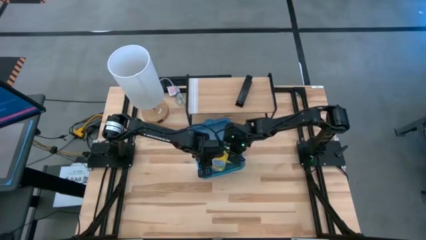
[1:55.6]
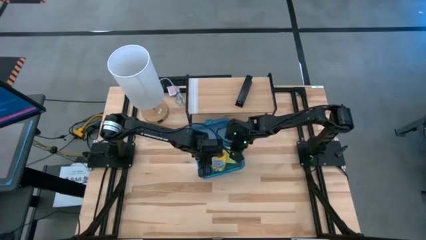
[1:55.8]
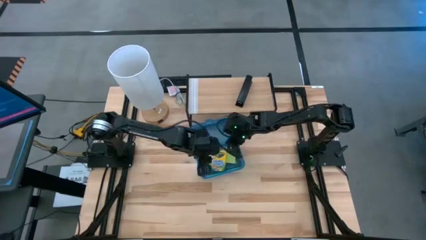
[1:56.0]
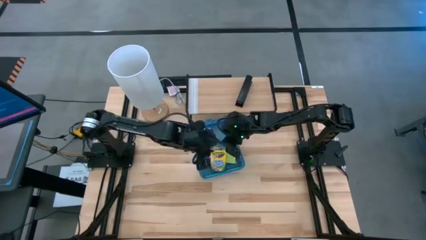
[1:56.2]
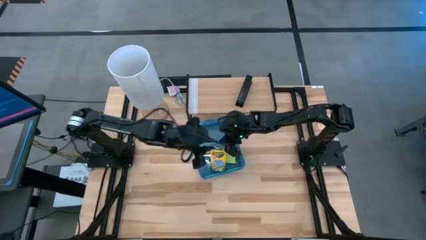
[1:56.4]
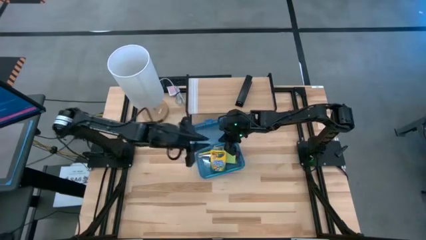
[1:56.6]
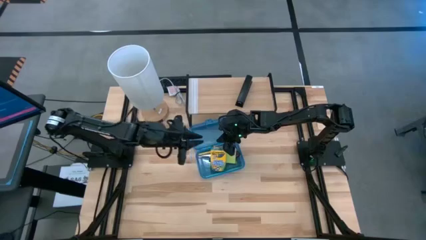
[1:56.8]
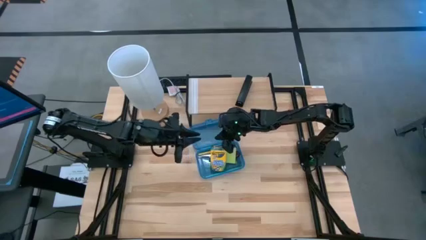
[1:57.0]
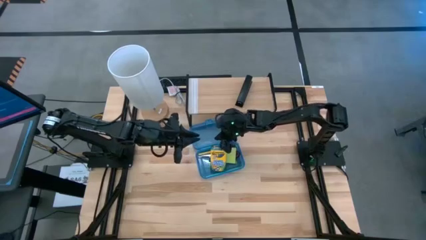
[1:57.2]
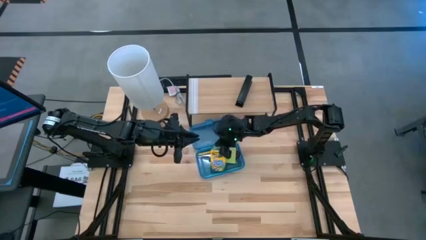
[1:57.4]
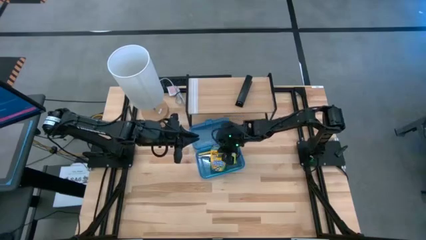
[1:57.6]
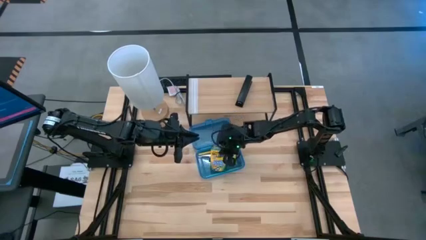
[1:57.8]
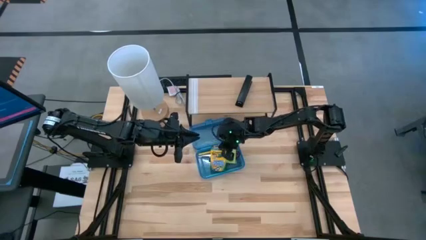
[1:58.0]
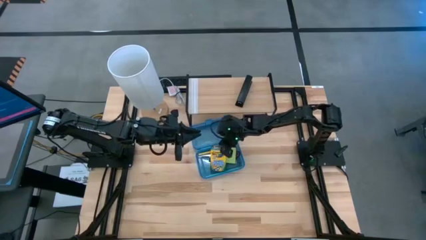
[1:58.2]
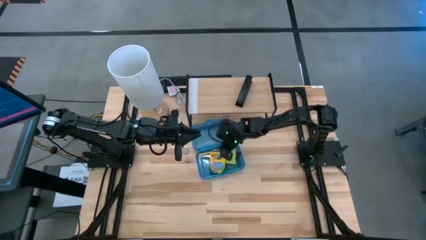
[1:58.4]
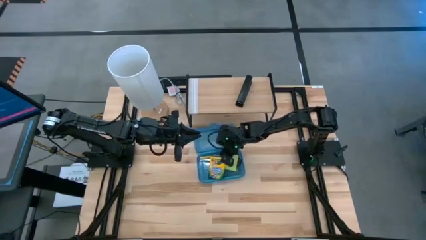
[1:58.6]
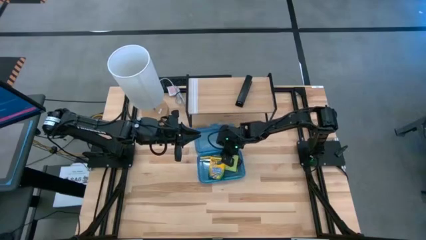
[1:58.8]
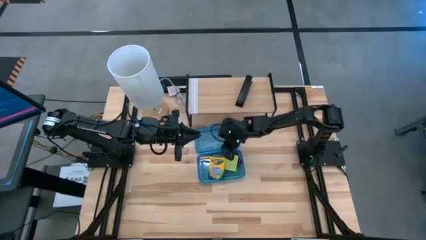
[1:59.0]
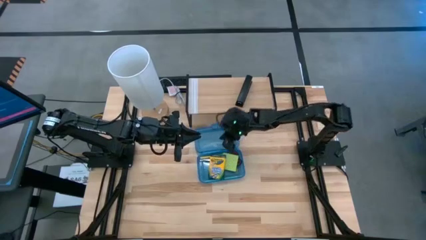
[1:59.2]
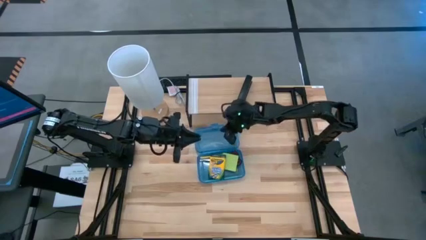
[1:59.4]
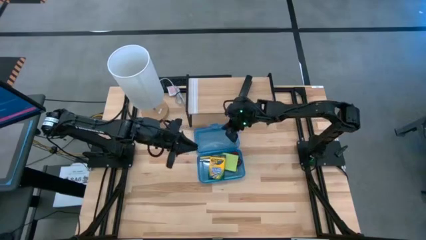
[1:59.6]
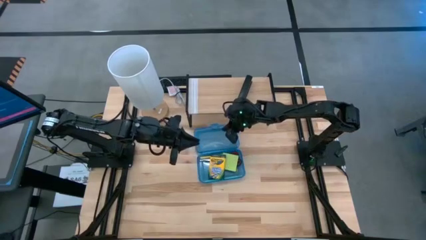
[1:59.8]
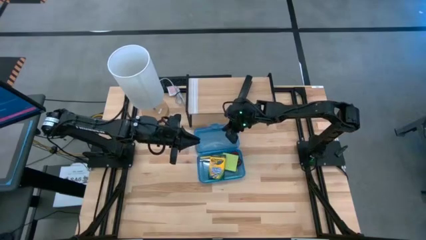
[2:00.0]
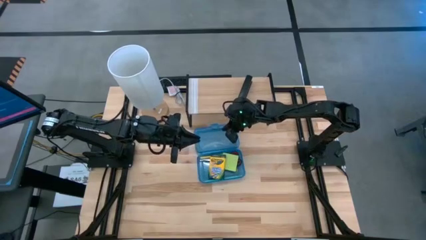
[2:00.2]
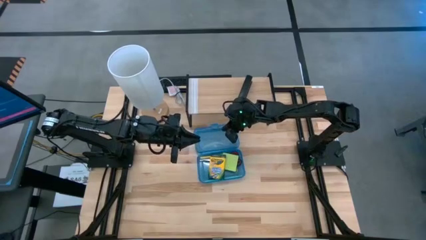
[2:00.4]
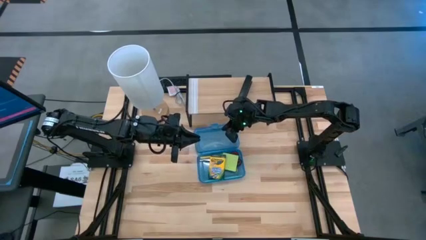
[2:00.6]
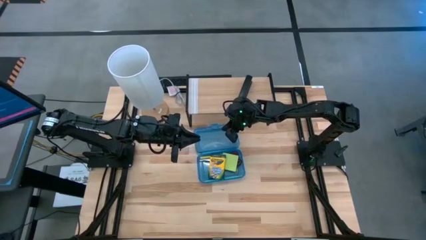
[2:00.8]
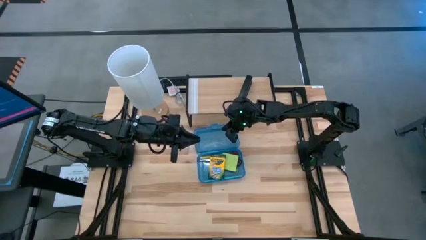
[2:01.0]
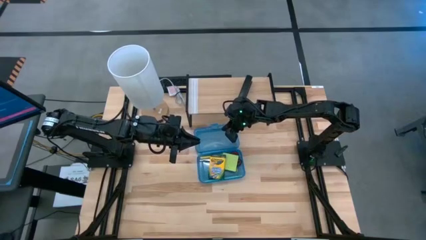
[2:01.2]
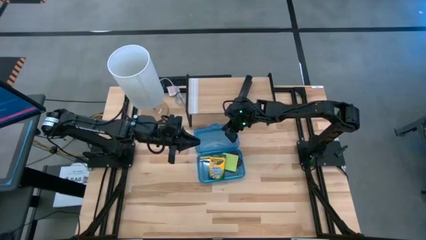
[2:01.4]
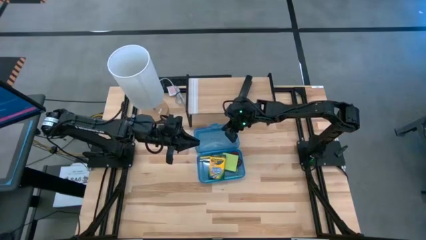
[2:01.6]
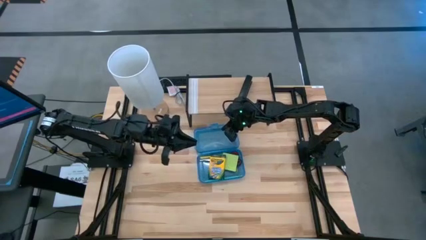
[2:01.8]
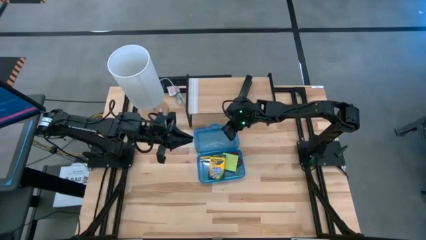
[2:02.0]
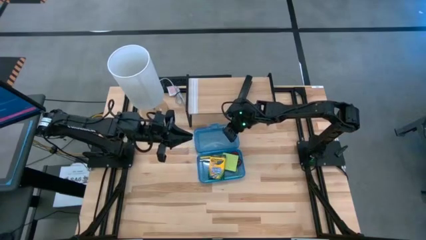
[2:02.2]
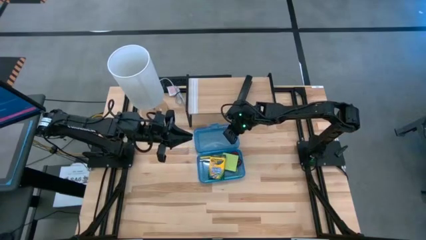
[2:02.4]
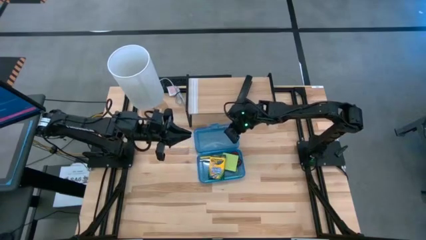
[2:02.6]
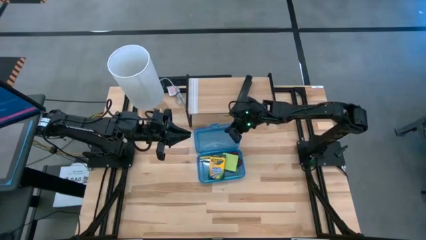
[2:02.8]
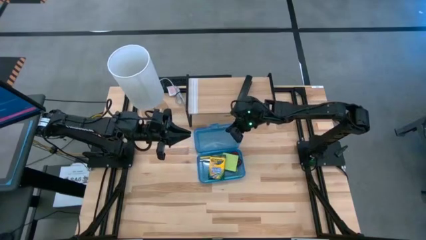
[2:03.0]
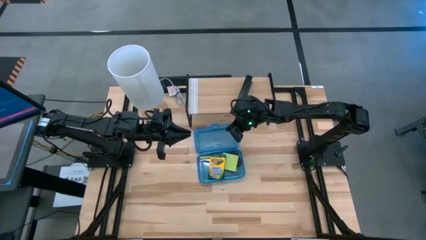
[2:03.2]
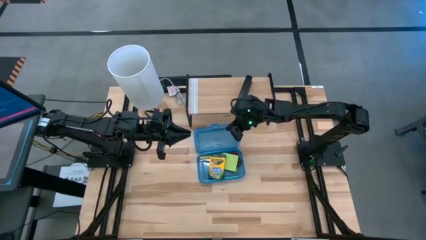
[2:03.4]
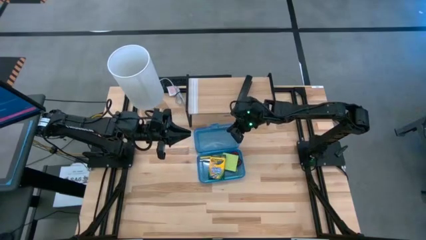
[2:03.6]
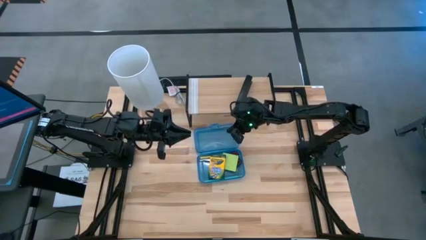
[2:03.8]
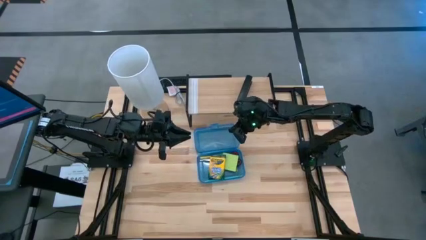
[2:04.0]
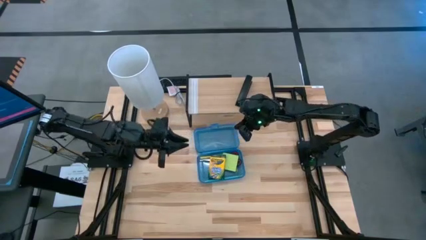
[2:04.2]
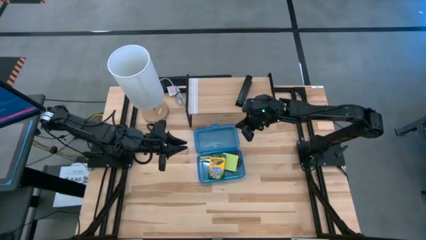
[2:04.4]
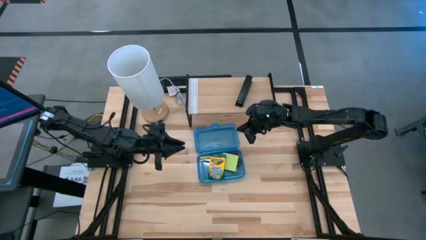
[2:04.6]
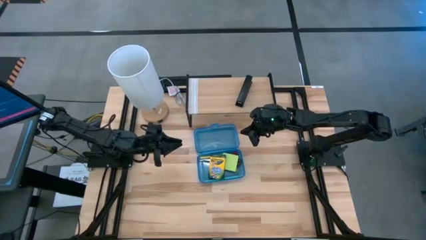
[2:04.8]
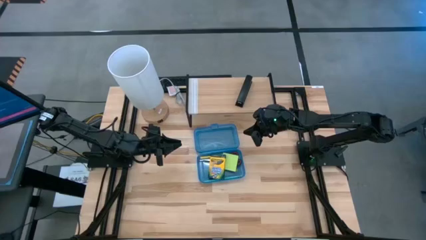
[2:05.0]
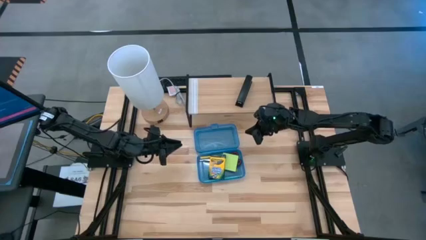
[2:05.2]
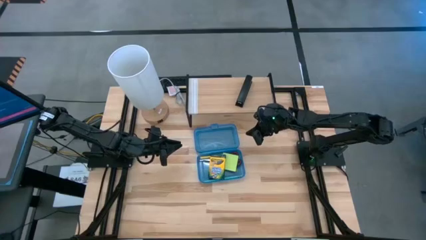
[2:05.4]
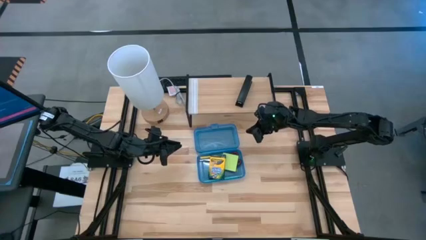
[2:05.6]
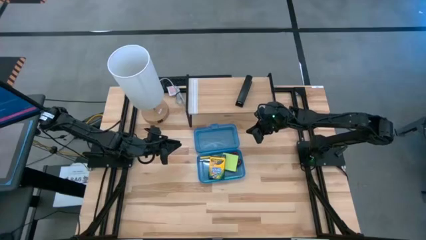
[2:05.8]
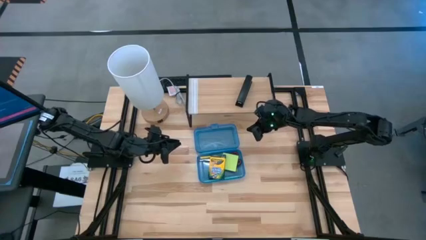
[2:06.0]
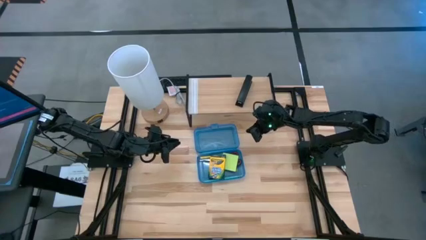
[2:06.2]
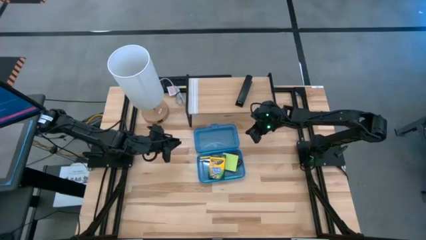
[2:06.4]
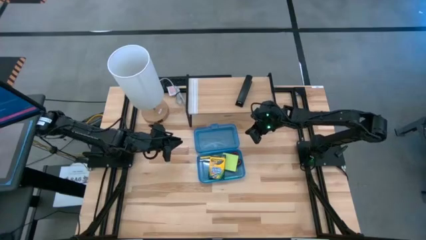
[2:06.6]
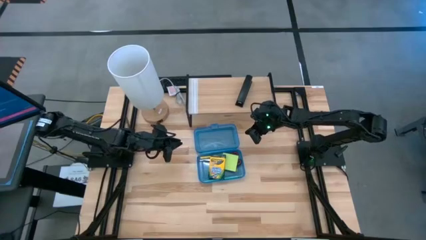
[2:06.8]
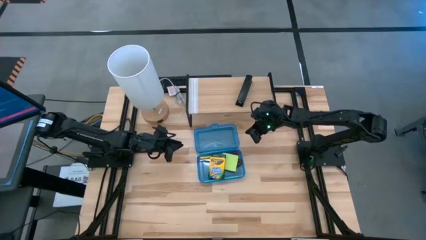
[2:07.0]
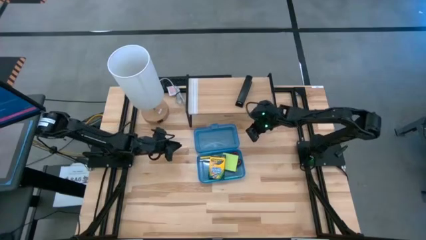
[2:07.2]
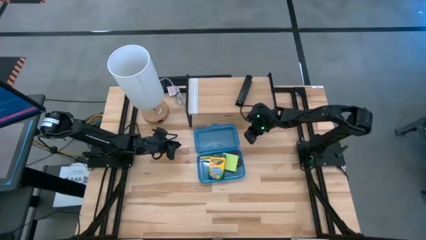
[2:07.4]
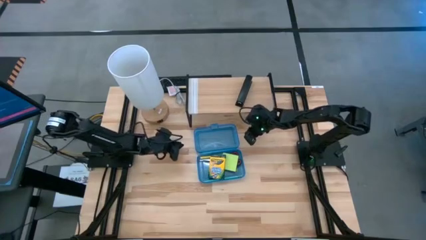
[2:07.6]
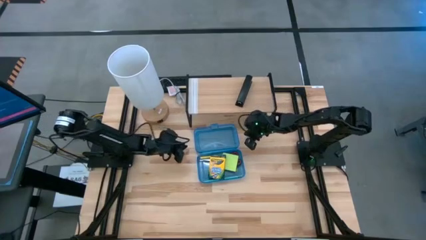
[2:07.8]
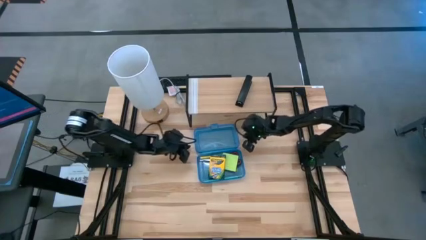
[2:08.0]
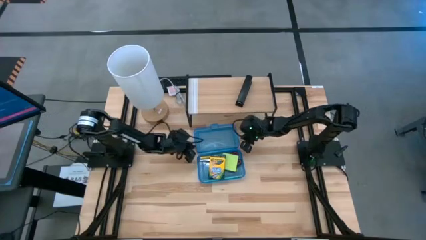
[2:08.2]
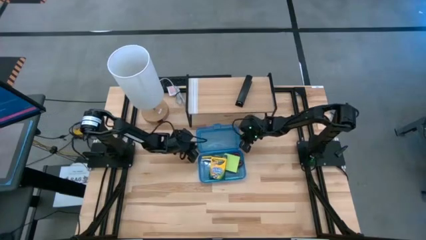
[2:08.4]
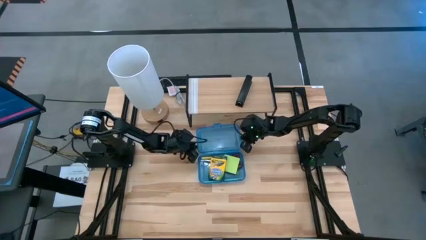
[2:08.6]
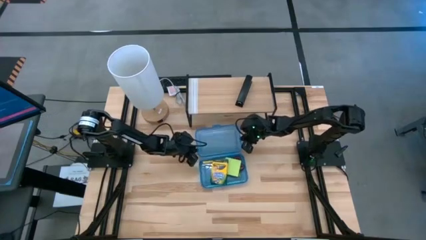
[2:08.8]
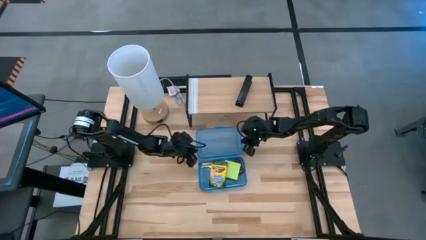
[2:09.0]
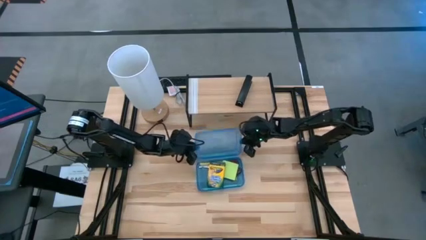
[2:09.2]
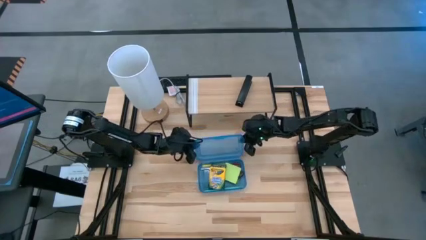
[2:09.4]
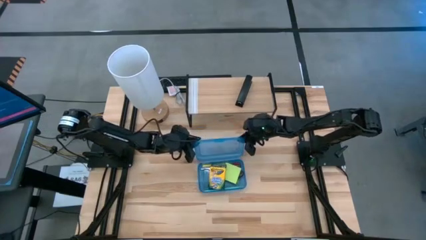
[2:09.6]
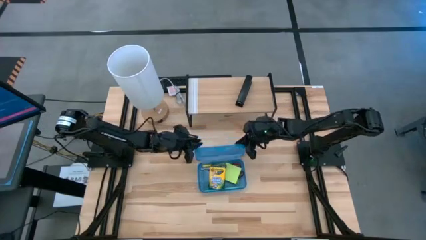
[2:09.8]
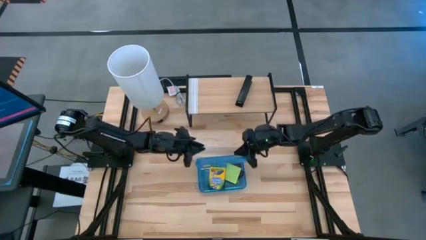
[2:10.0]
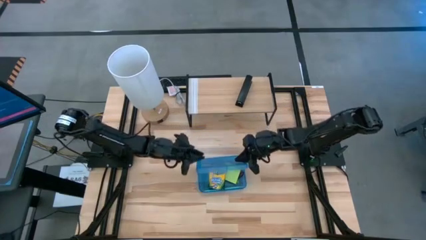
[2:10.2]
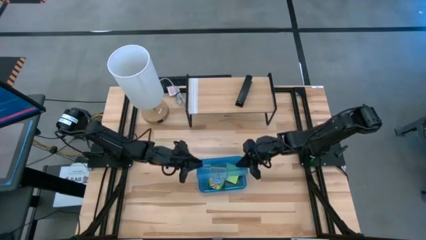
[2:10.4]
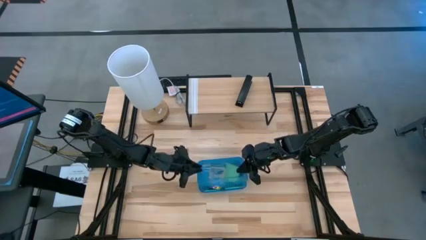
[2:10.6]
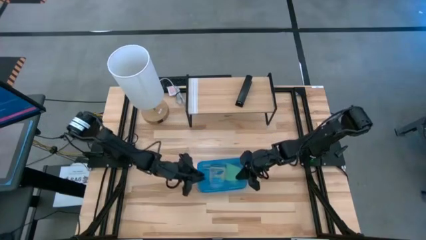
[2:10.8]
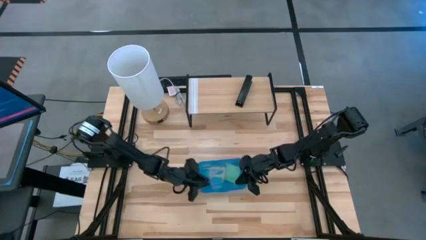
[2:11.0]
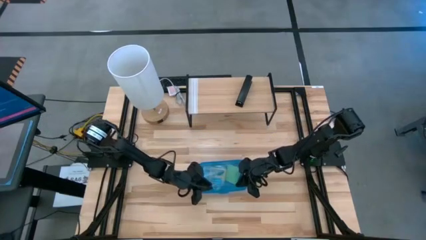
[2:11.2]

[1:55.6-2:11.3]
Task: Pack school essentials
Close the blue supply box
